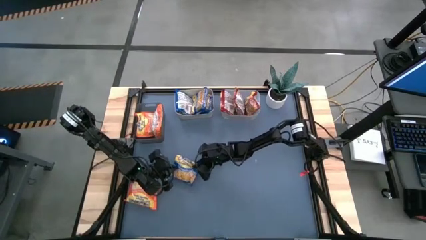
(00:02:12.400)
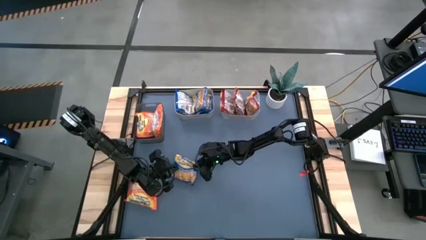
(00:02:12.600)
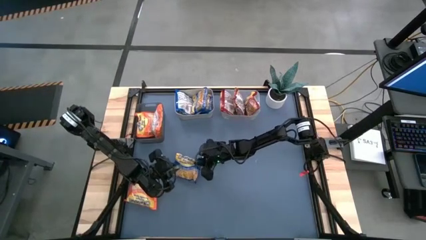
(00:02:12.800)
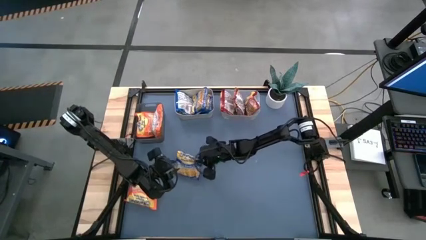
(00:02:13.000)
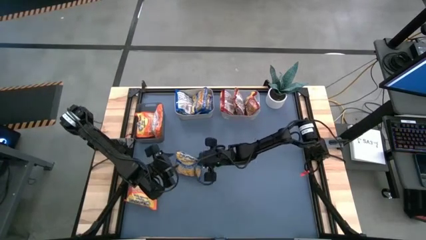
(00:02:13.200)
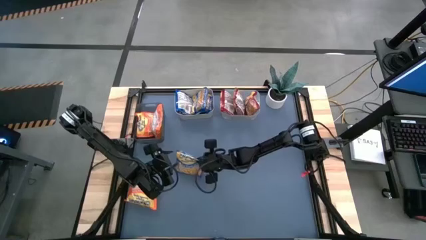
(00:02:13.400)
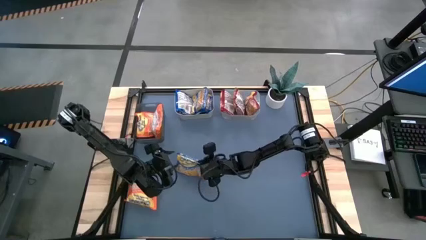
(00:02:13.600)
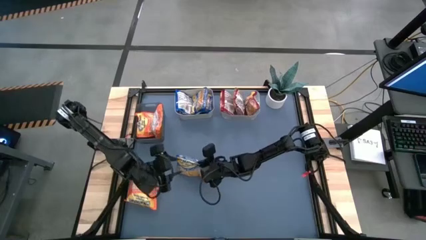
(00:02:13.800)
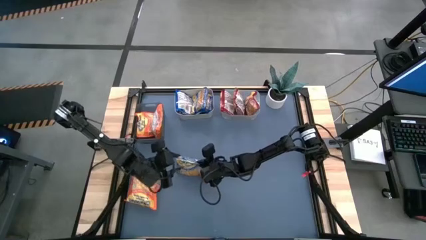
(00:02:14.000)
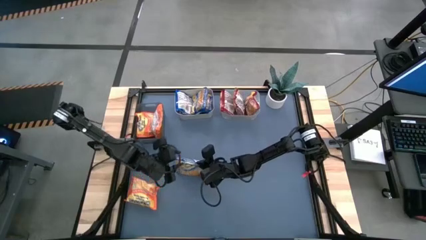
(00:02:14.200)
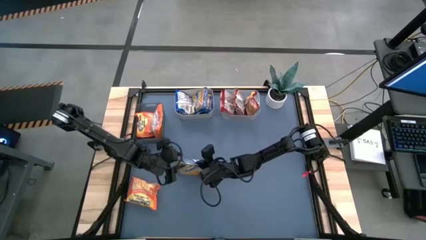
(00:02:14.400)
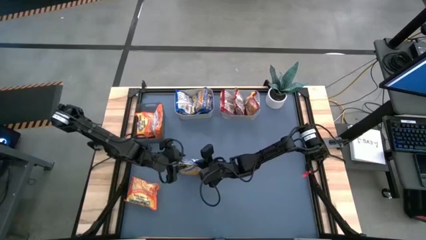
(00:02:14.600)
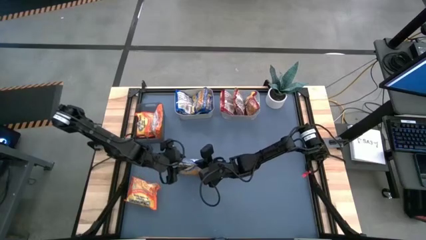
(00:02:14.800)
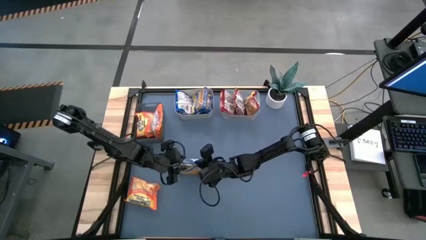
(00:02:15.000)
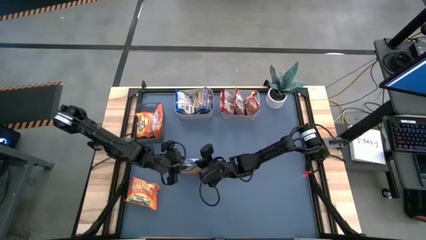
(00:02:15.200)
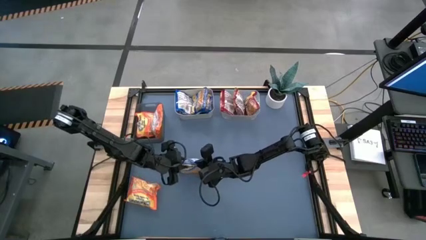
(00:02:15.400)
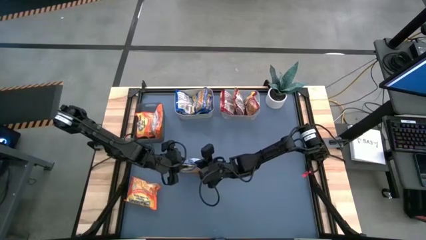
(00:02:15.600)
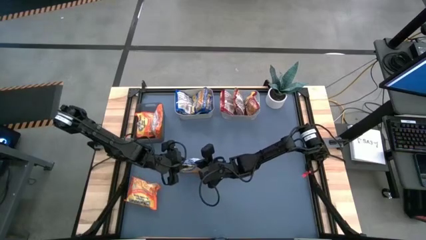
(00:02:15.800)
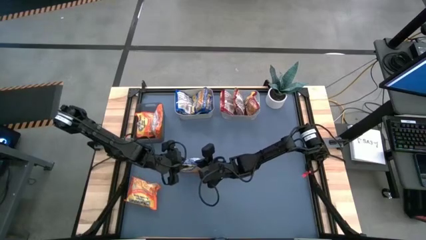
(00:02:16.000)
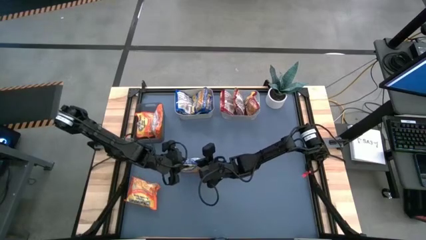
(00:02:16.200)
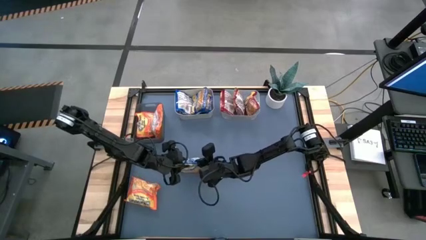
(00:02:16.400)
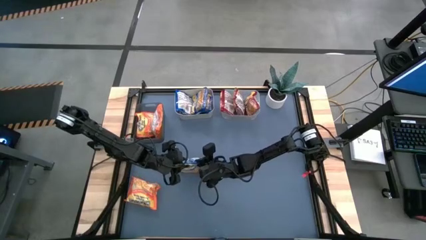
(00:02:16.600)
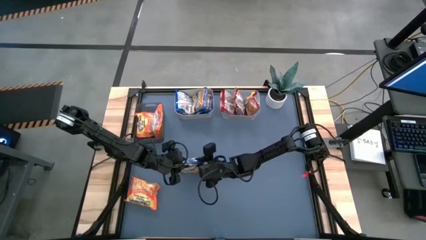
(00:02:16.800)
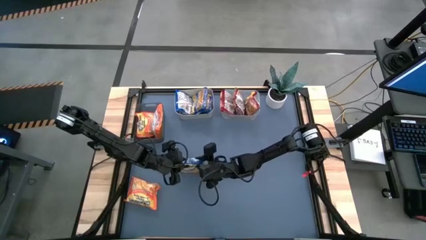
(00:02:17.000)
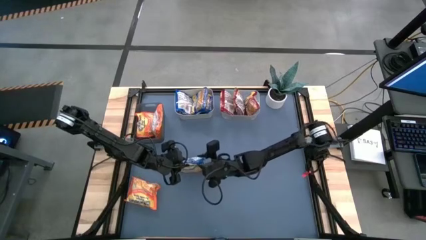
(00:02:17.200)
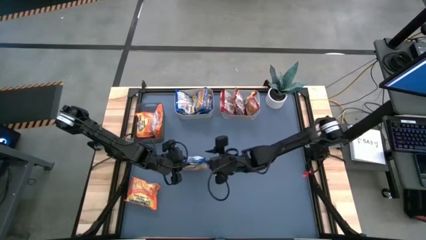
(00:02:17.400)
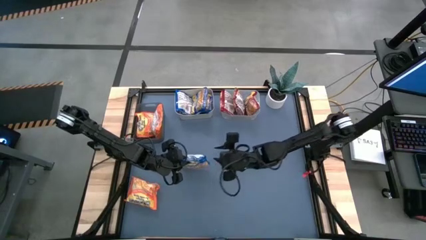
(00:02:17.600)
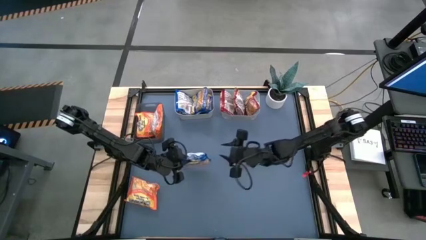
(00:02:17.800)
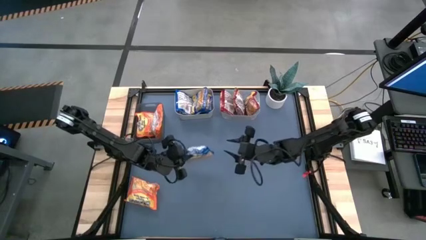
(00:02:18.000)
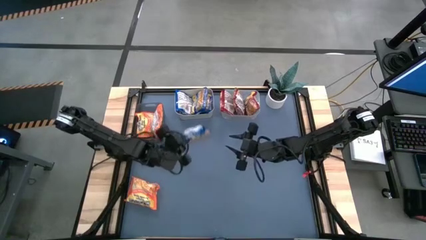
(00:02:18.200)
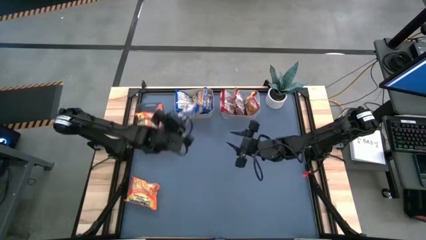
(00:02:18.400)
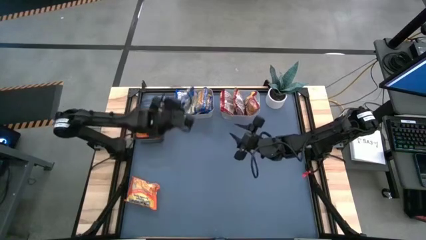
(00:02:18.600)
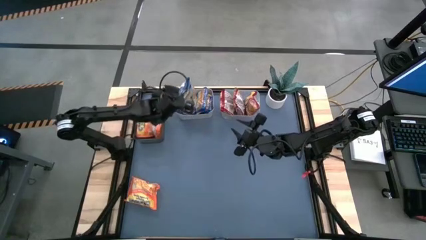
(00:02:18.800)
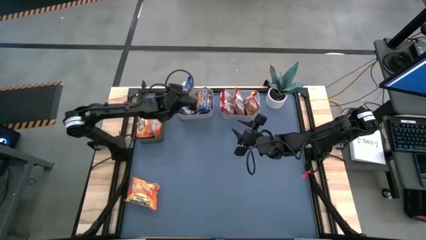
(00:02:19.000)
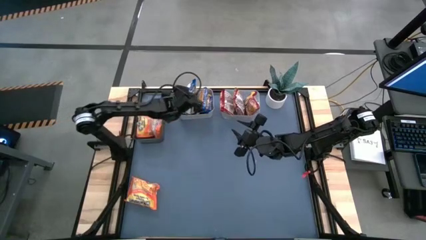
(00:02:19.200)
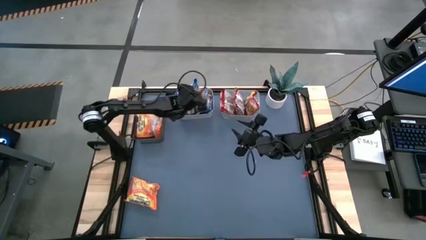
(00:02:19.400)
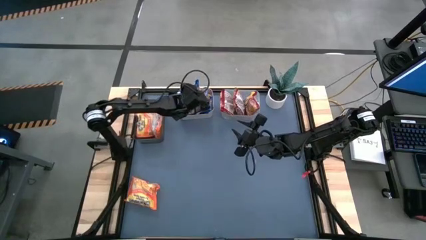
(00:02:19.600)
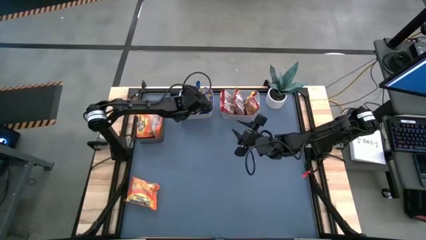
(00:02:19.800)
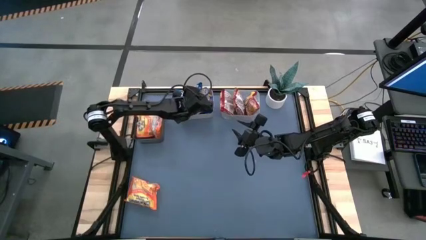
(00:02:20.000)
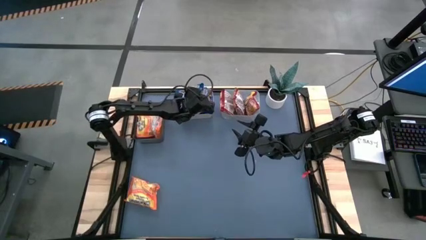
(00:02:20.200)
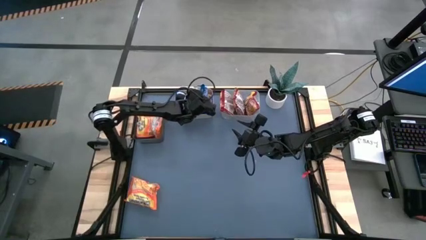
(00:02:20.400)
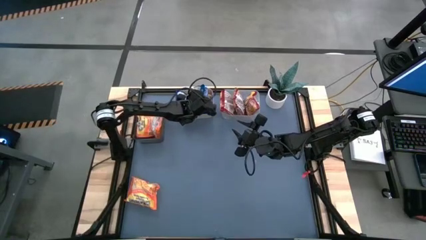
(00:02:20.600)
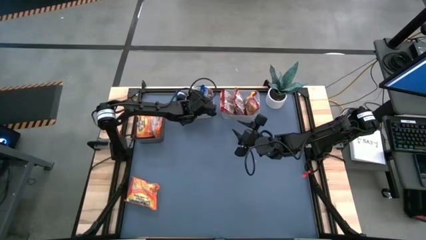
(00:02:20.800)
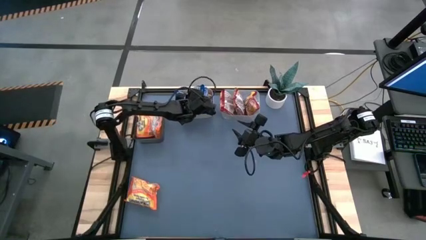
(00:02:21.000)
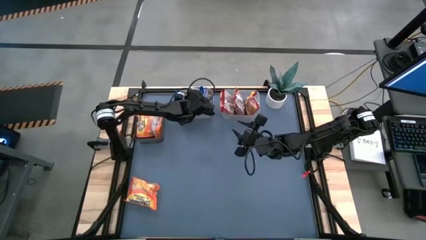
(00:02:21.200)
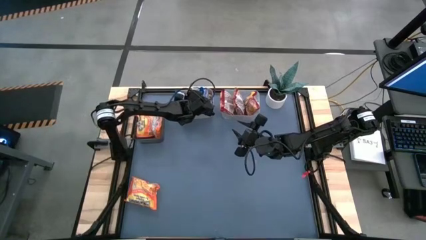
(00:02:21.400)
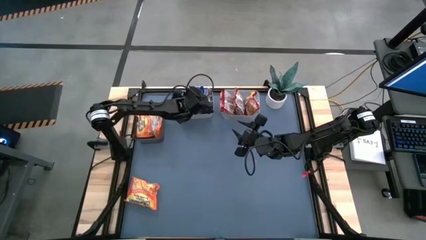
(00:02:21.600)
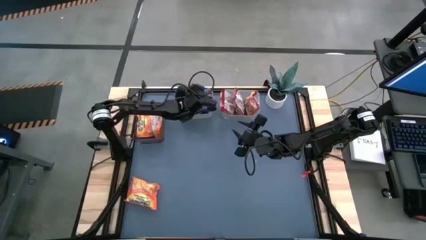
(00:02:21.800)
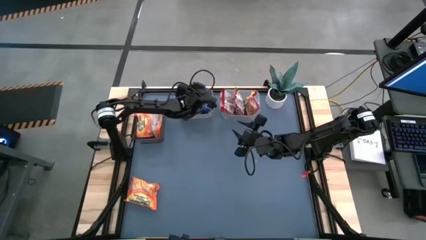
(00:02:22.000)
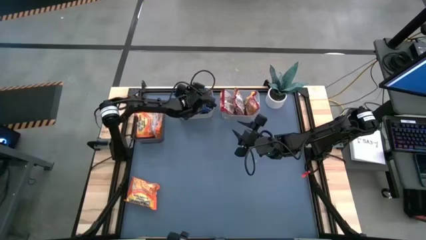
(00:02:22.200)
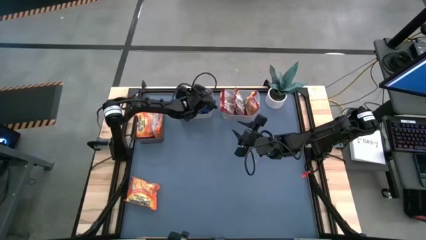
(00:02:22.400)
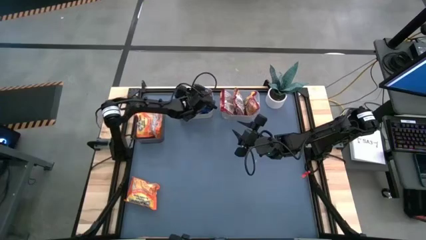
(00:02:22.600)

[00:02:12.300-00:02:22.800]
Task: Sort Maruchan noodles
Put the blue noodle pack into the gray bin

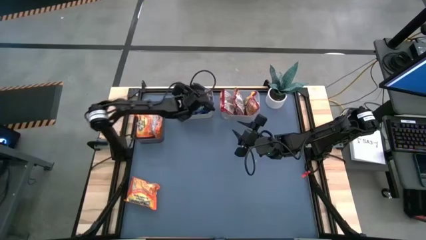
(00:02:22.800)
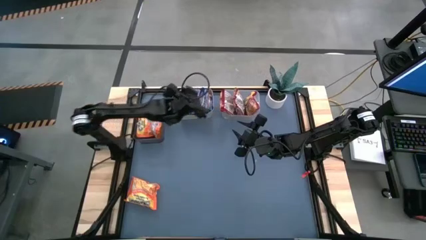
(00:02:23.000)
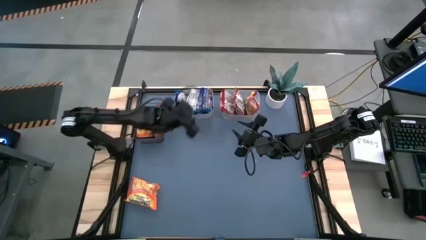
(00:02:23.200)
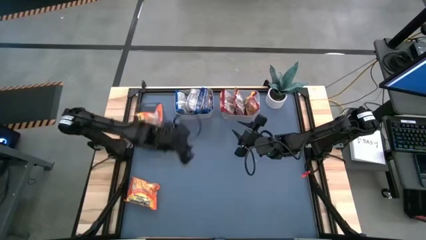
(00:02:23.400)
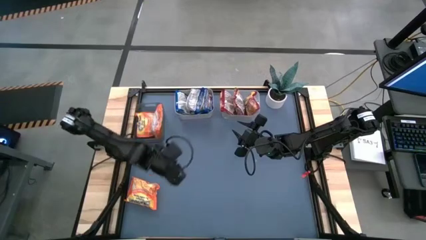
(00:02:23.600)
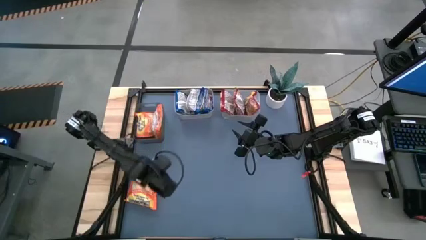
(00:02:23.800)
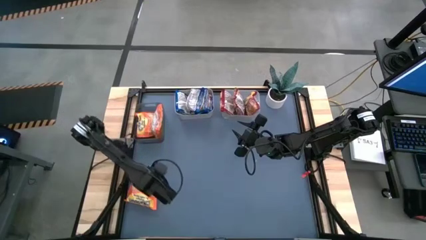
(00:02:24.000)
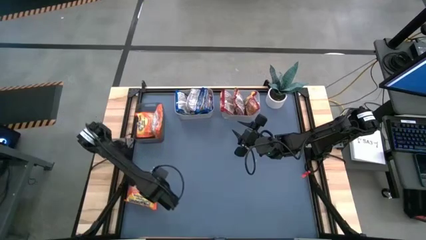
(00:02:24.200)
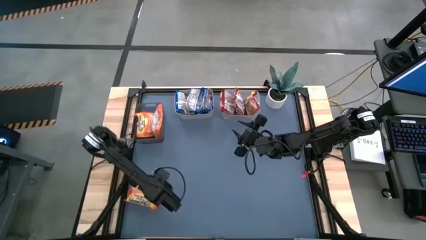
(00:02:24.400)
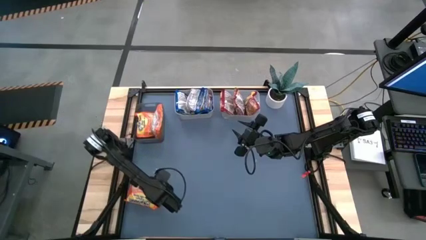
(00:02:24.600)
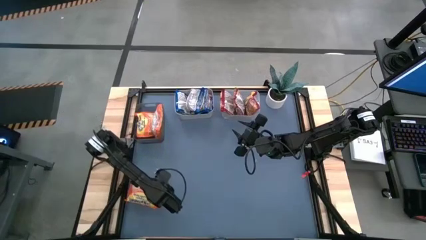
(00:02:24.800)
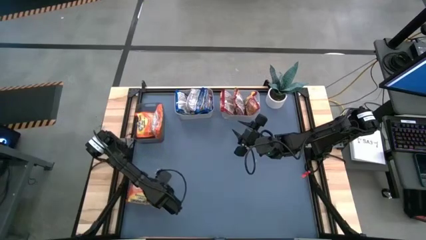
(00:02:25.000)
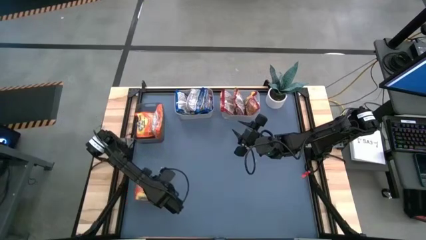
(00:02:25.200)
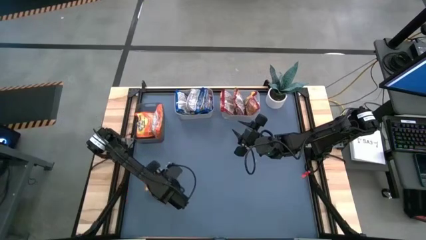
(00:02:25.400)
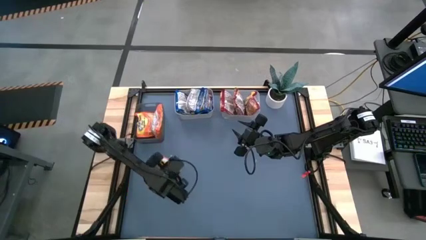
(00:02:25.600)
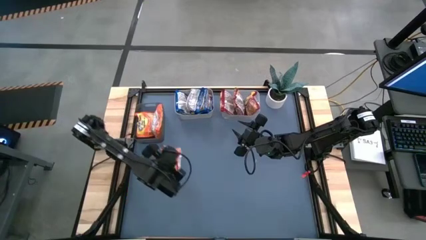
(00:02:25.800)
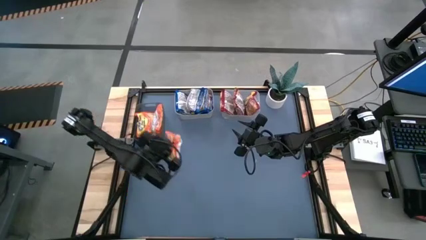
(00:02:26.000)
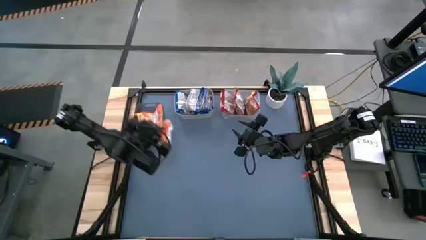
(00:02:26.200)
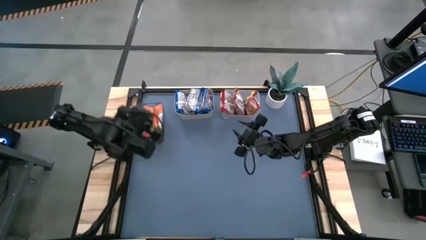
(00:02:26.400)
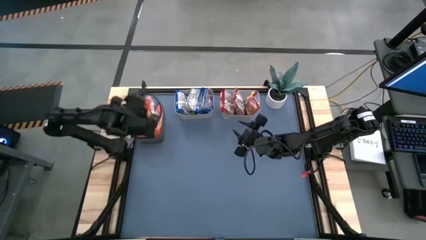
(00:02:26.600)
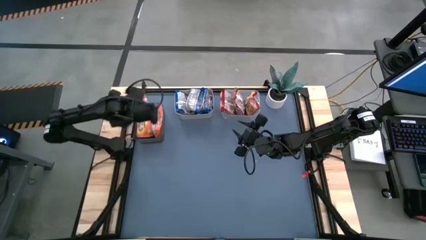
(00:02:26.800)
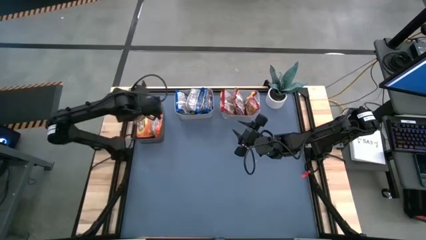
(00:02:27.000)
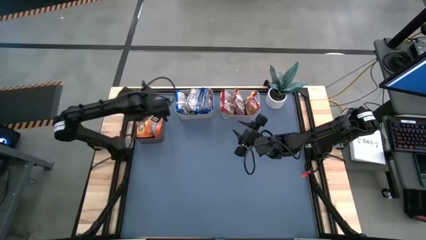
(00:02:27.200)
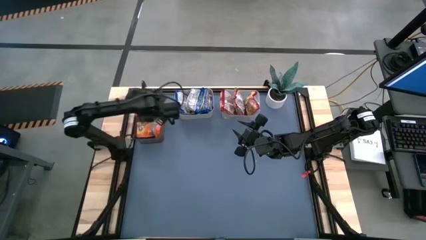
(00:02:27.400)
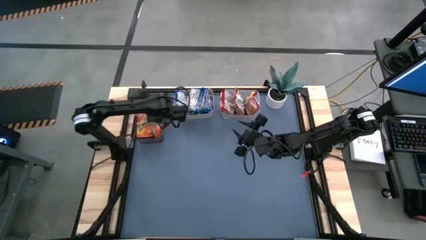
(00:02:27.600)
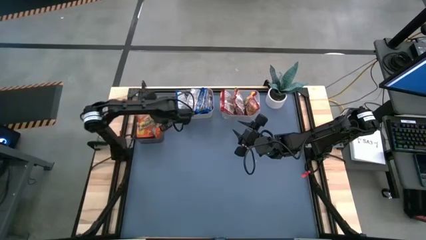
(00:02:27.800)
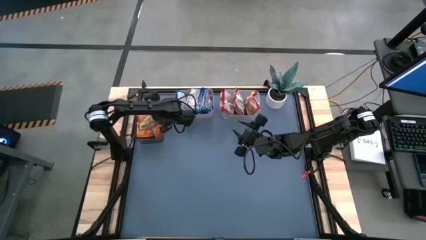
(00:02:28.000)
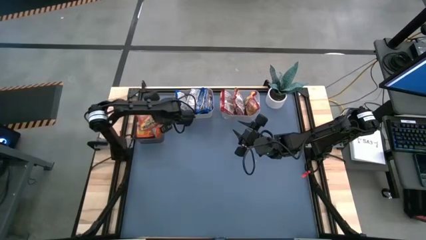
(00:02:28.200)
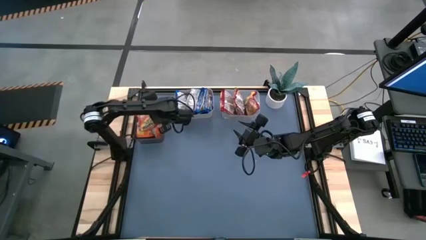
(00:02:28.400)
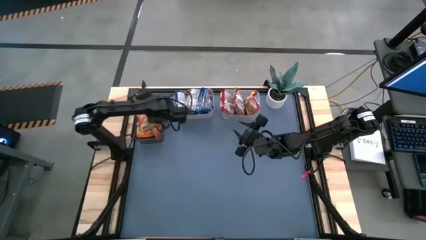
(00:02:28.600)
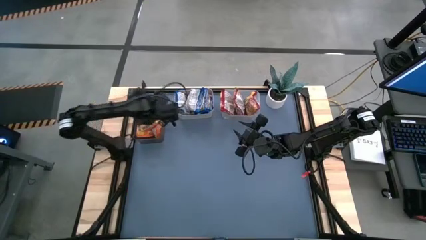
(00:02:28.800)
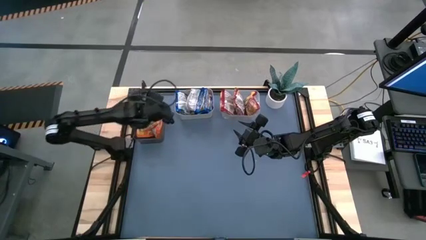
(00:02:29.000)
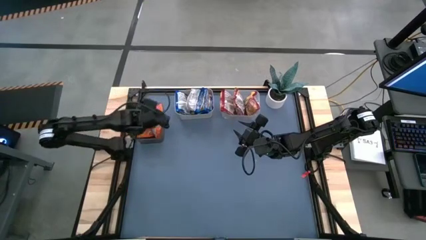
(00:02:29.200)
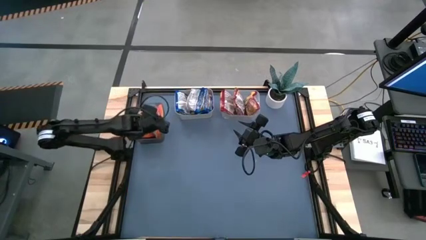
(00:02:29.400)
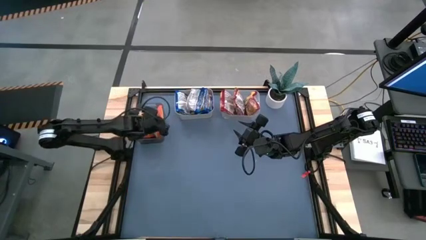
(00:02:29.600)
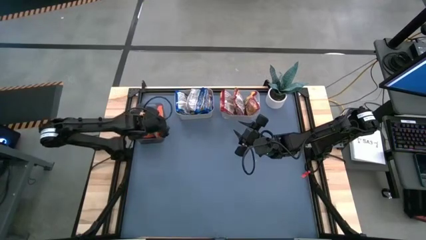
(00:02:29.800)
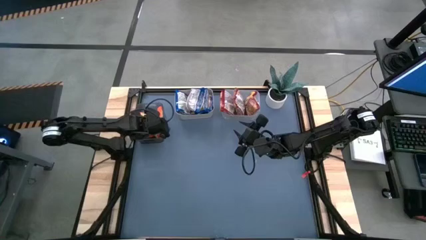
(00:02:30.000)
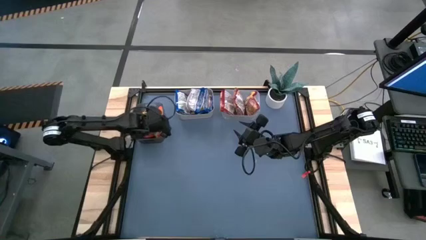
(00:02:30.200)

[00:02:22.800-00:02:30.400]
Put the orange noodle pack into the black bin
